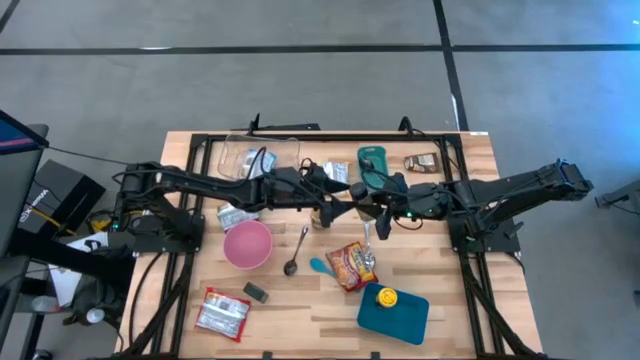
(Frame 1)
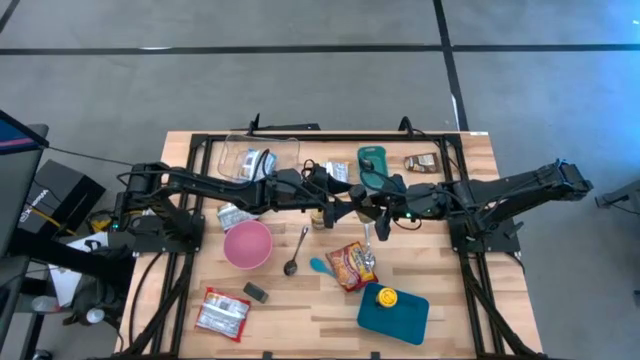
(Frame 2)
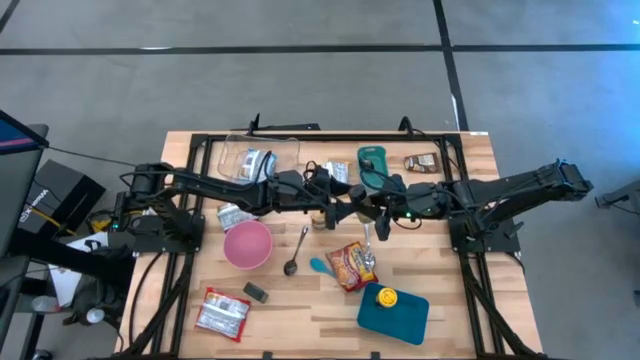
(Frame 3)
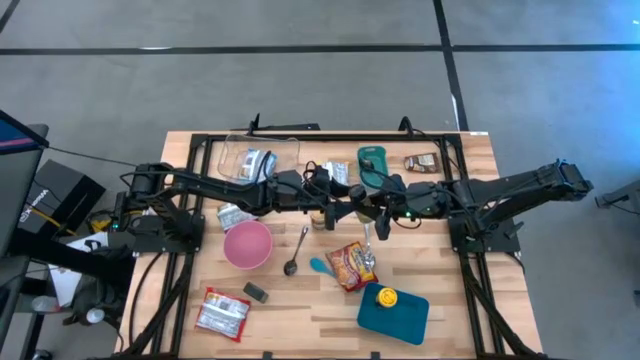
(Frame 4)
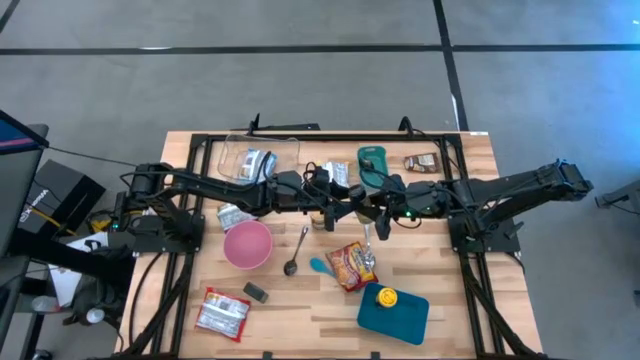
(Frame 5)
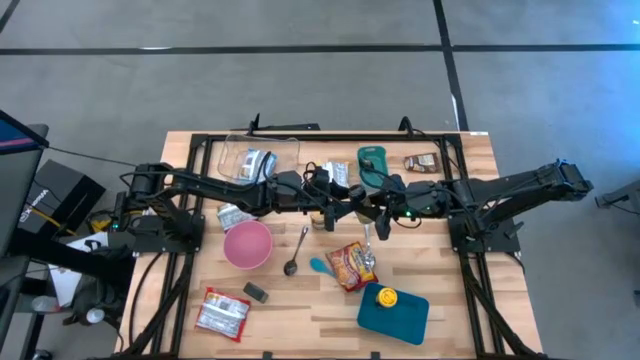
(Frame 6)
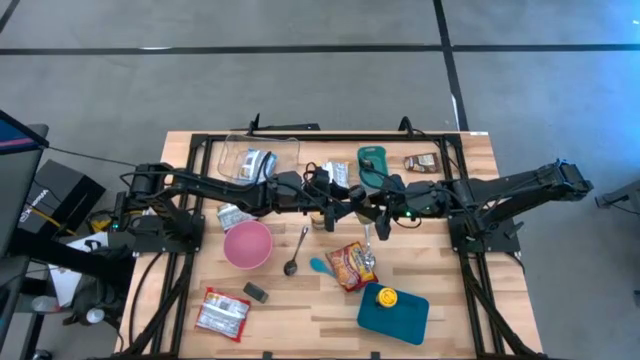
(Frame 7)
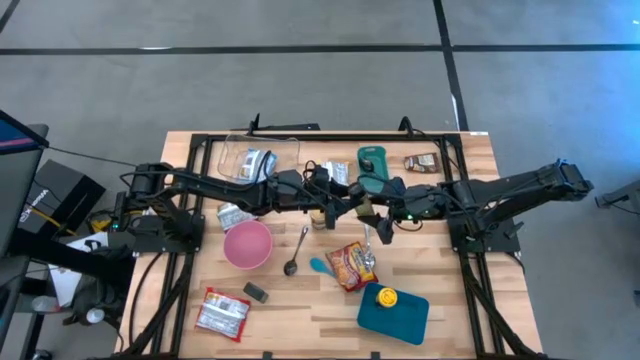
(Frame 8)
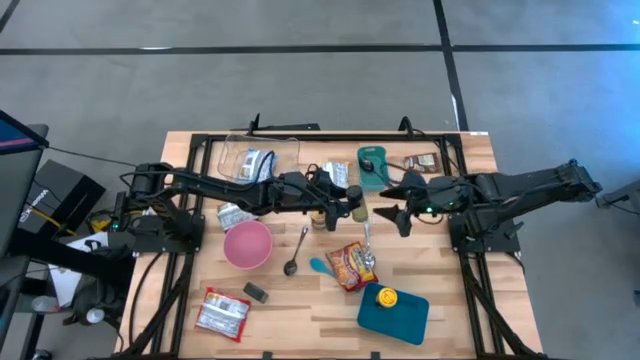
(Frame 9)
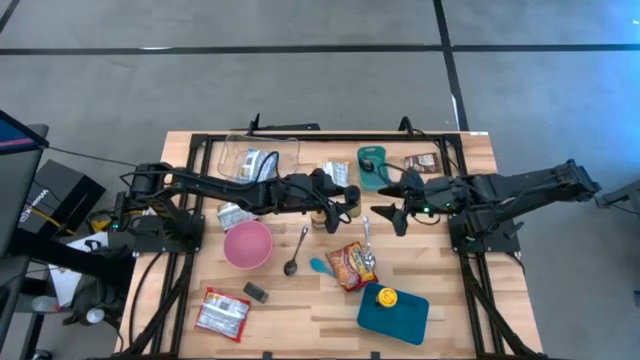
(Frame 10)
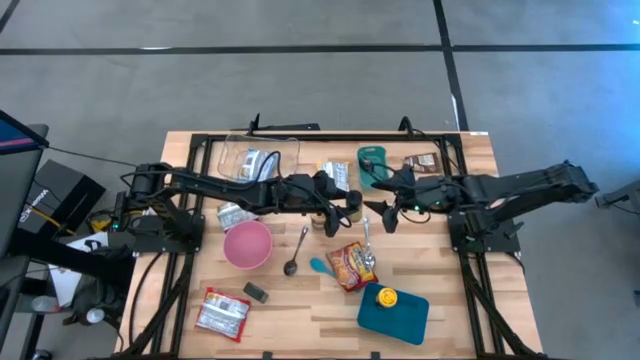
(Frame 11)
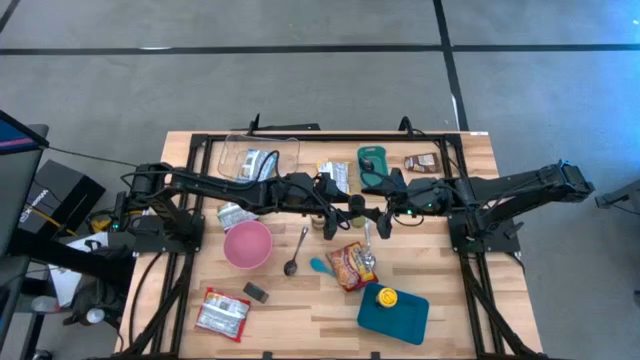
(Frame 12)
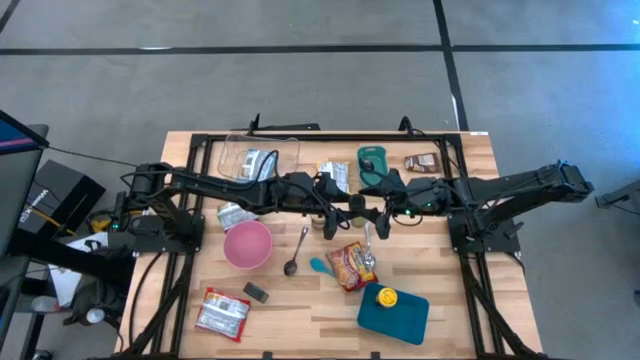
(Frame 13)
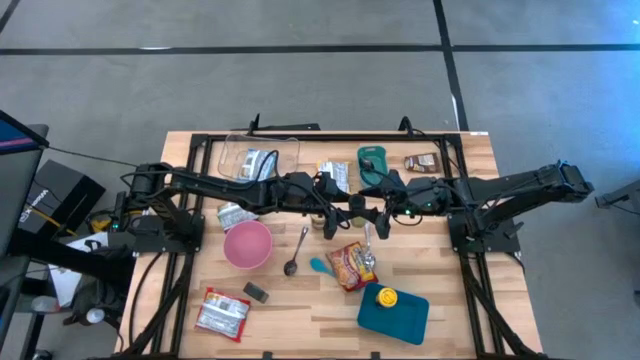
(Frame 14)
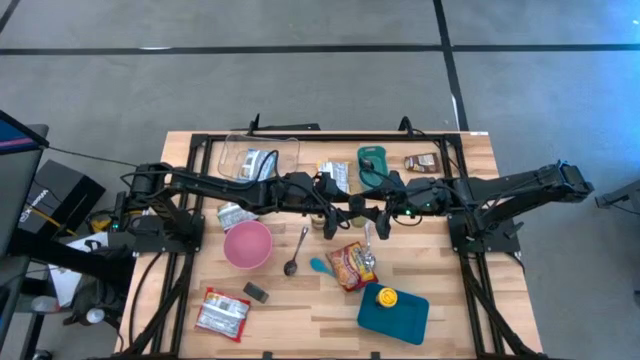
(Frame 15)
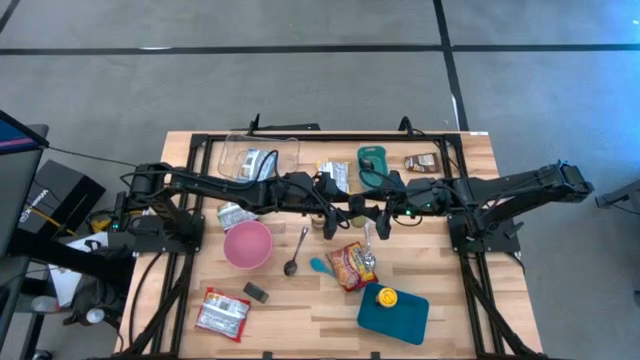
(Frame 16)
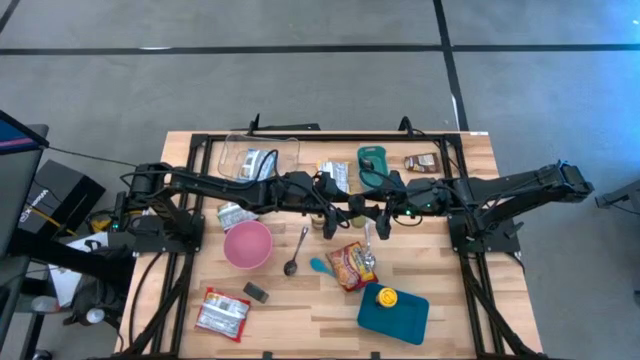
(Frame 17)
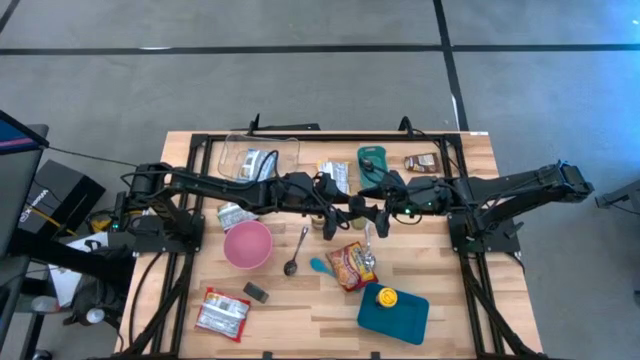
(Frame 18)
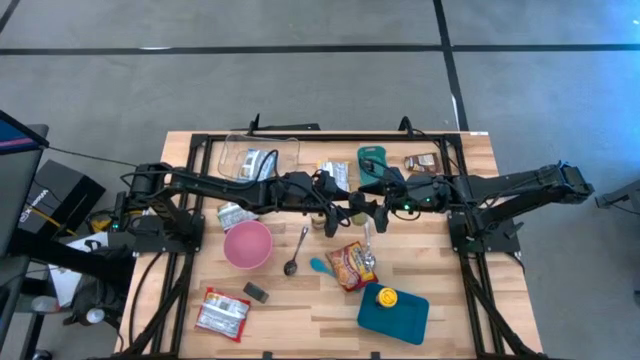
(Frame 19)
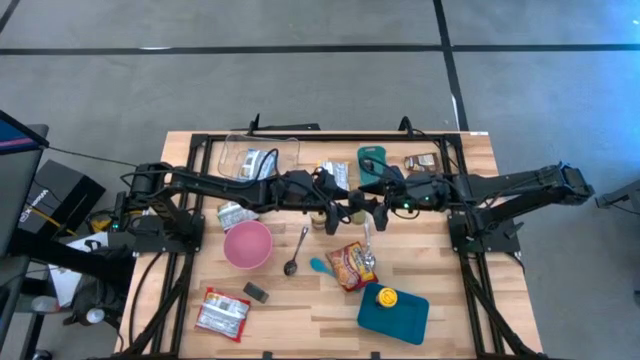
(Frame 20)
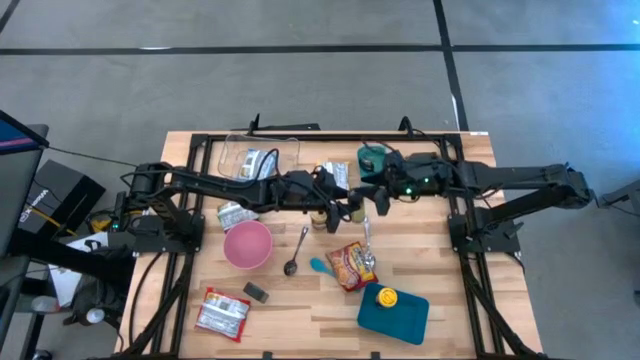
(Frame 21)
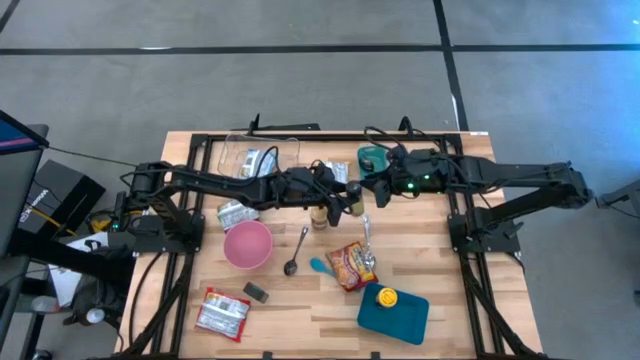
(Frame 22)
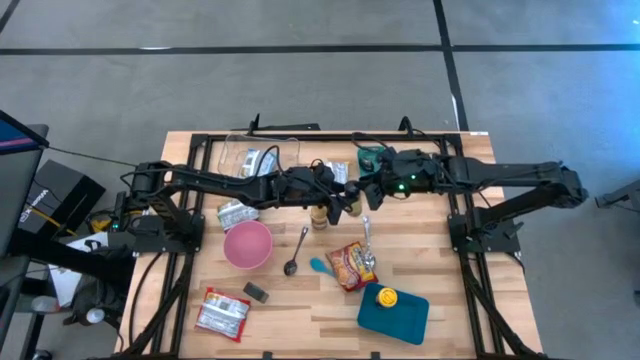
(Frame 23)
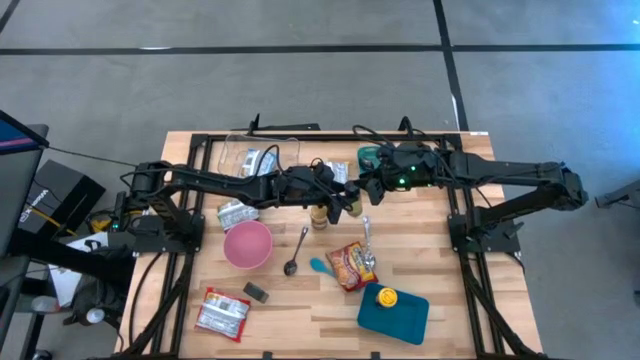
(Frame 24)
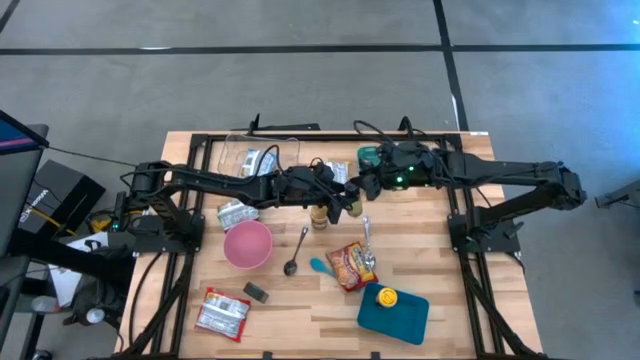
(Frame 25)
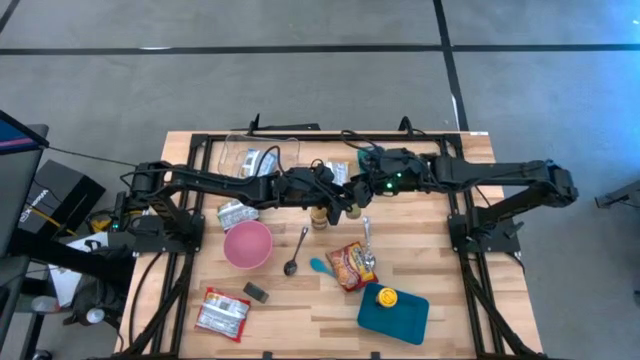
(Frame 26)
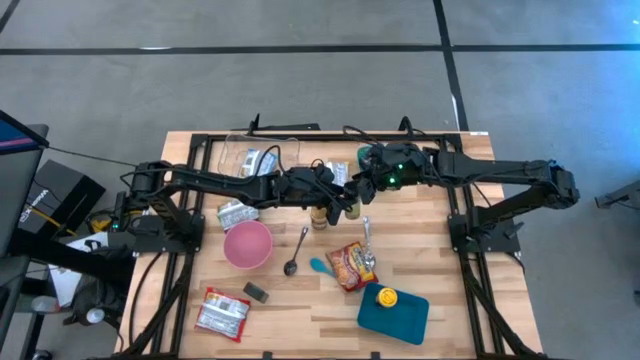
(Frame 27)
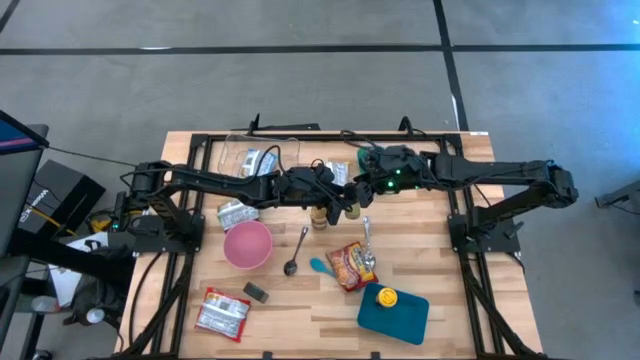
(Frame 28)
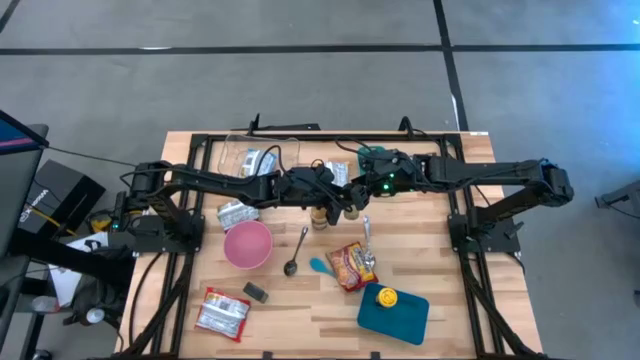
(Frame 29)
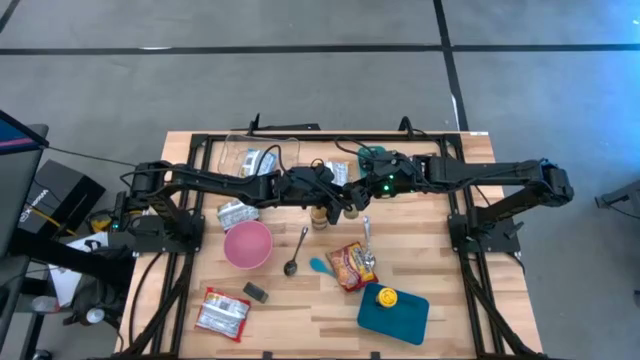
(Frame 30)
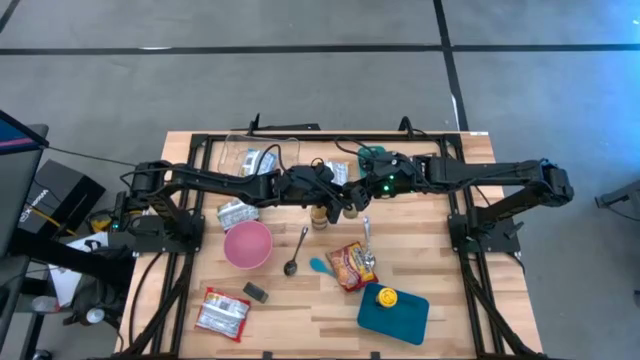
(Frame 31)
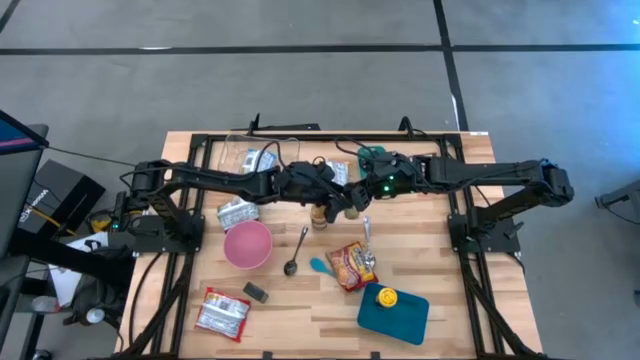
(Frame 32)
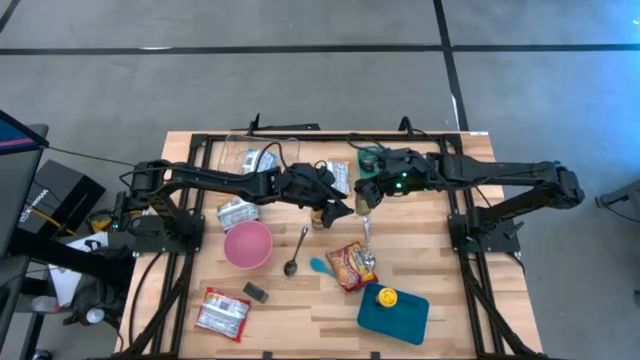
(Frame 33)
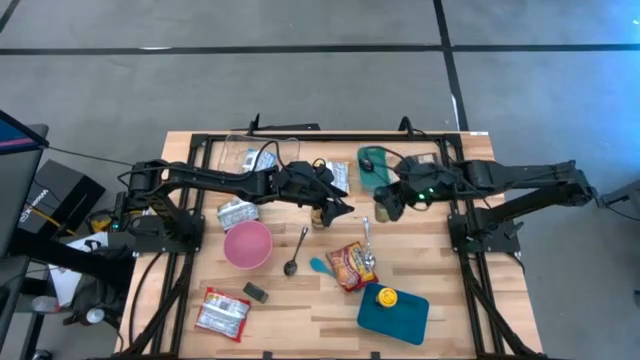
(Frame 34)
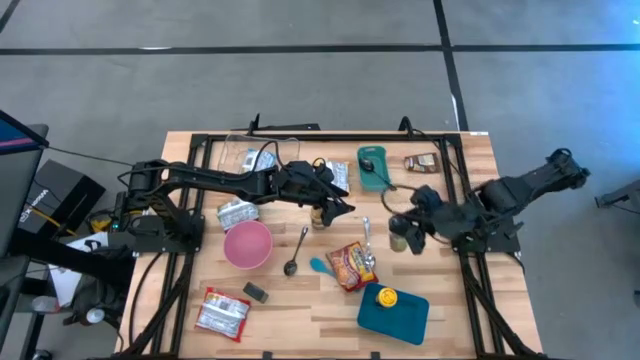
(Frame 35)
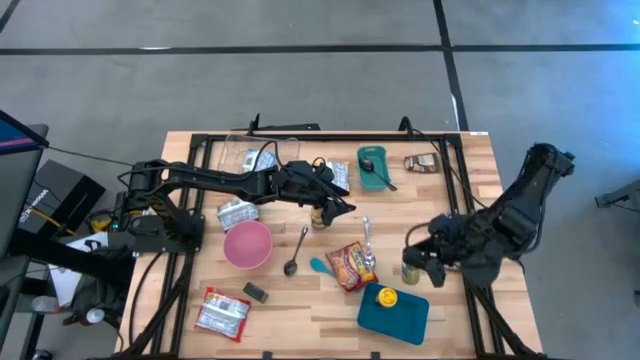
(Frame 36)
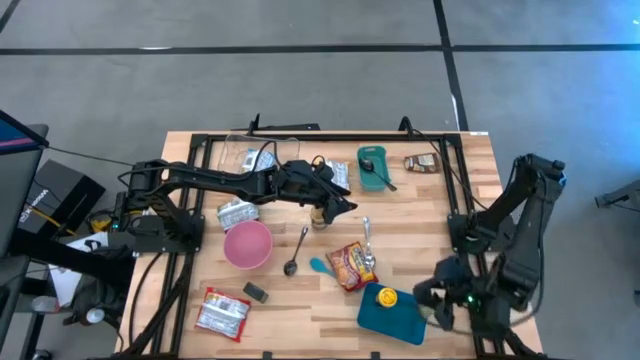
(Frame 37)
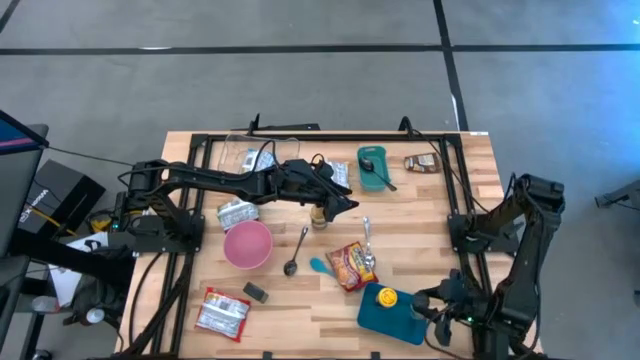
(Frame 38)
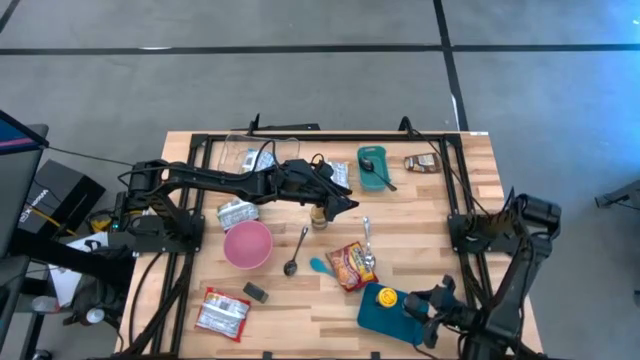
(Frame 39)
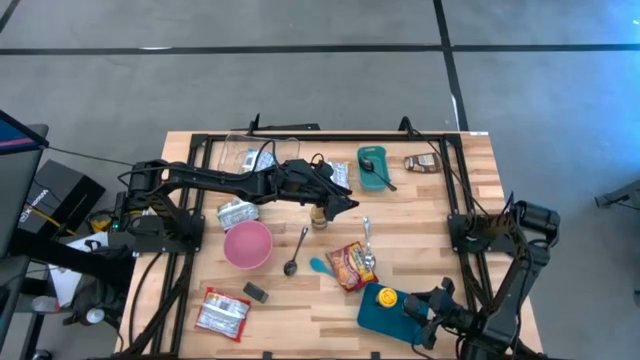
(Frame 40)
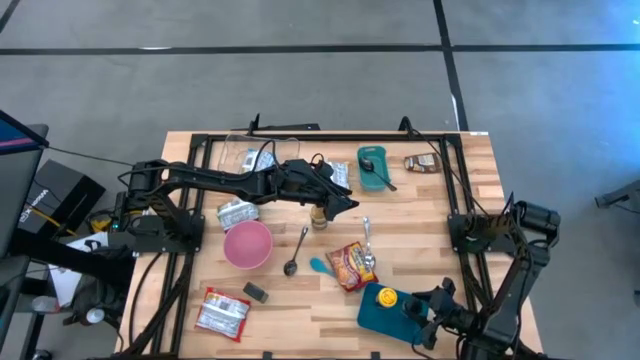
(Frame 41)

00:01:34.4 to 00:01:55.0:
Task: Pick & Place Food Item
Put the black seasoning bottle into the blue bin
